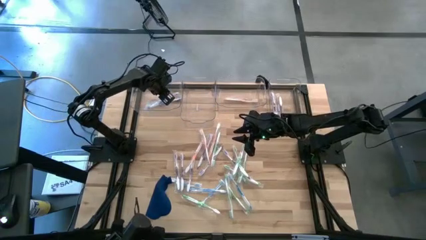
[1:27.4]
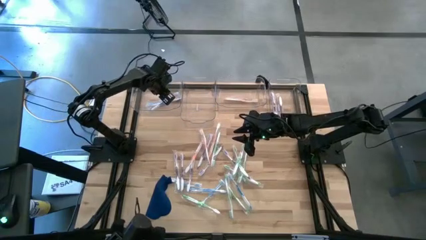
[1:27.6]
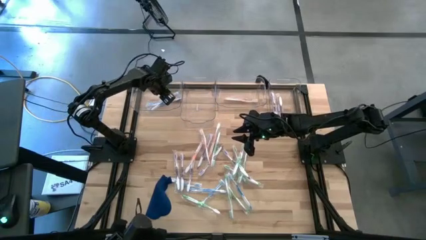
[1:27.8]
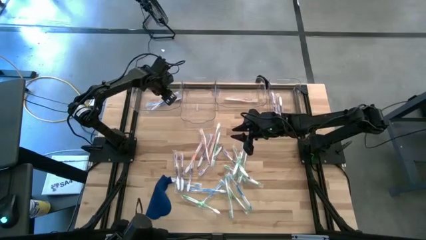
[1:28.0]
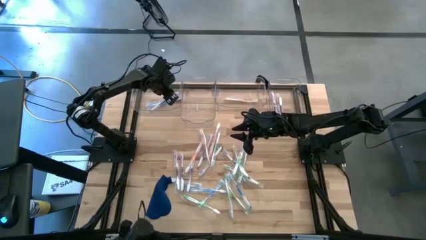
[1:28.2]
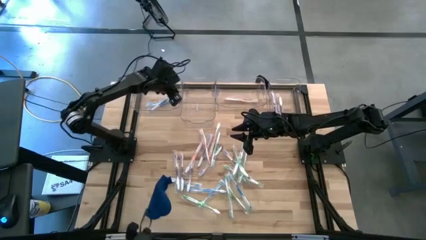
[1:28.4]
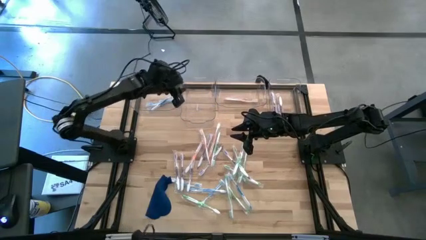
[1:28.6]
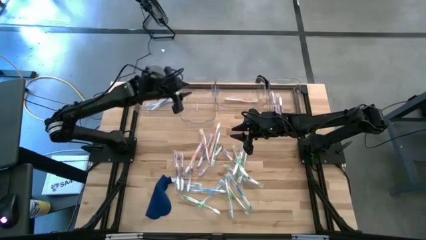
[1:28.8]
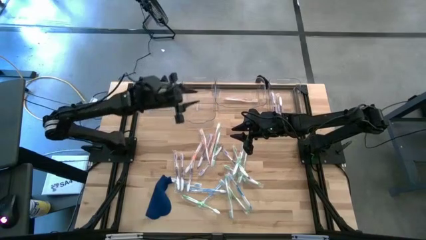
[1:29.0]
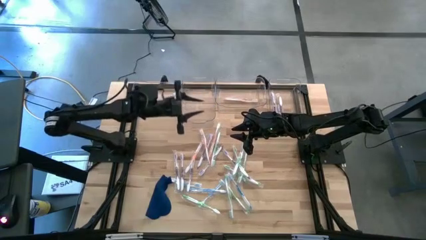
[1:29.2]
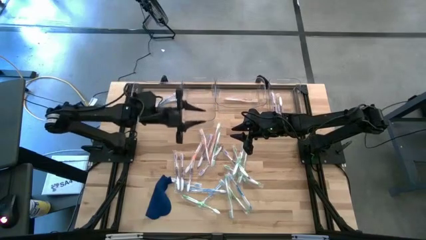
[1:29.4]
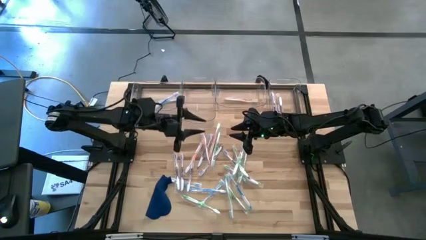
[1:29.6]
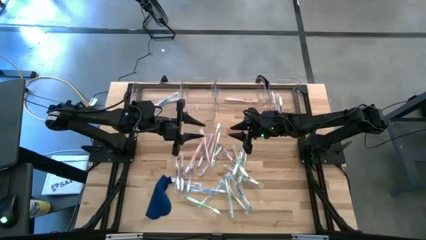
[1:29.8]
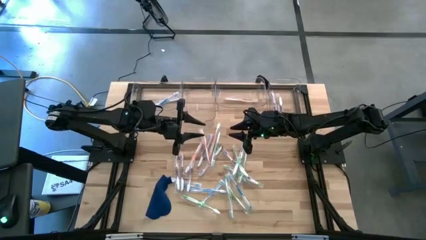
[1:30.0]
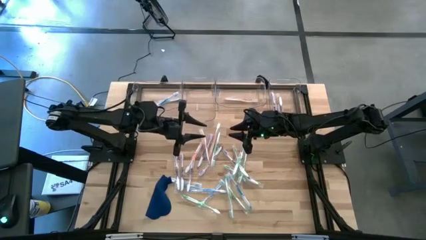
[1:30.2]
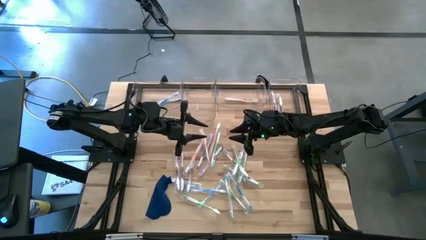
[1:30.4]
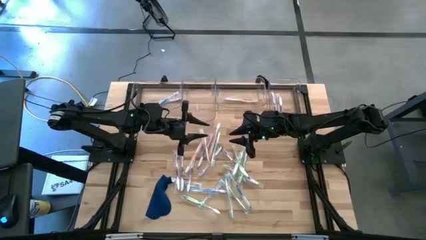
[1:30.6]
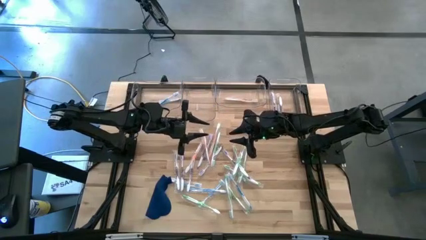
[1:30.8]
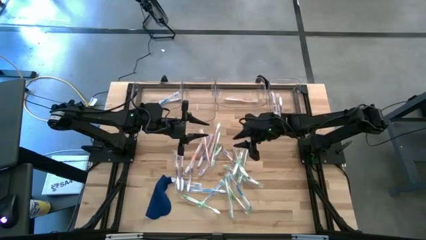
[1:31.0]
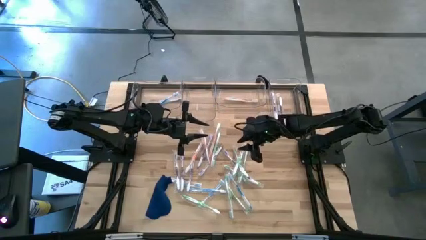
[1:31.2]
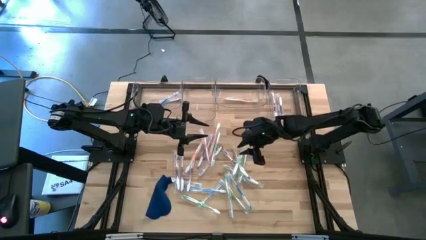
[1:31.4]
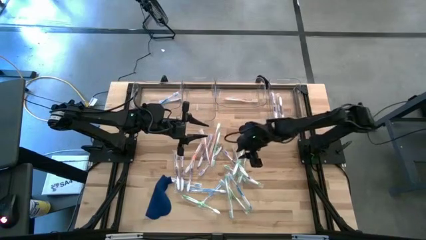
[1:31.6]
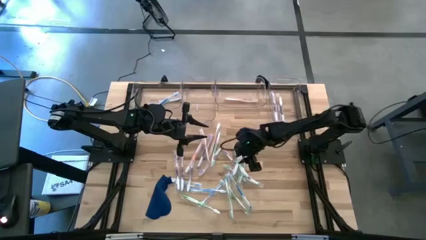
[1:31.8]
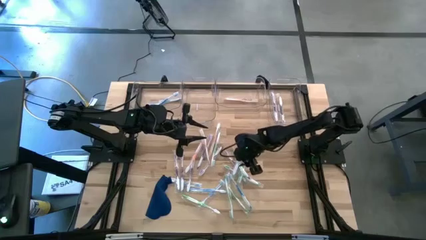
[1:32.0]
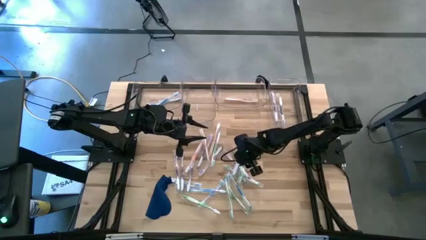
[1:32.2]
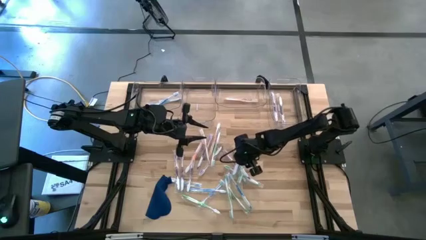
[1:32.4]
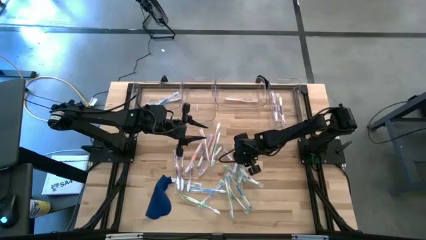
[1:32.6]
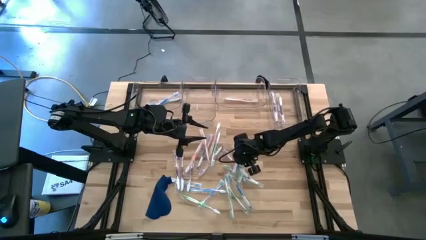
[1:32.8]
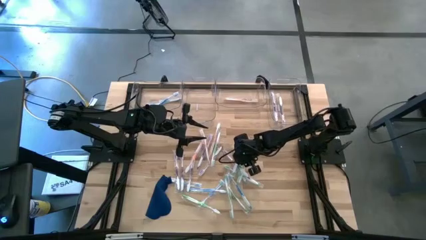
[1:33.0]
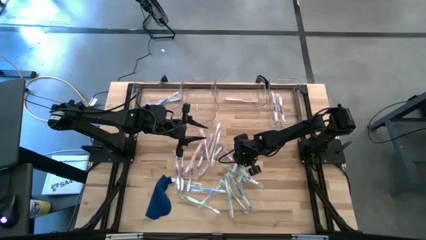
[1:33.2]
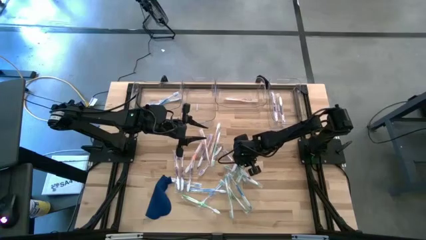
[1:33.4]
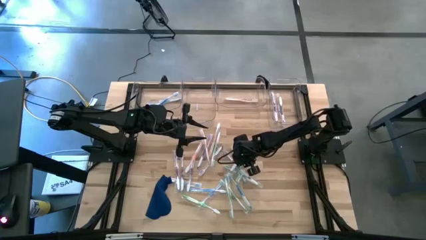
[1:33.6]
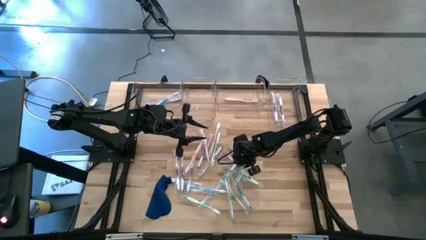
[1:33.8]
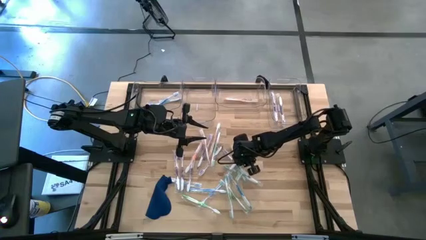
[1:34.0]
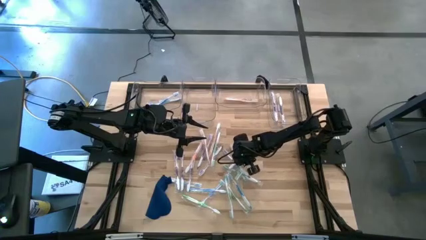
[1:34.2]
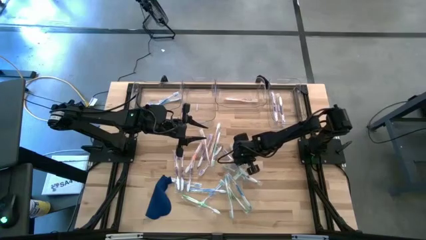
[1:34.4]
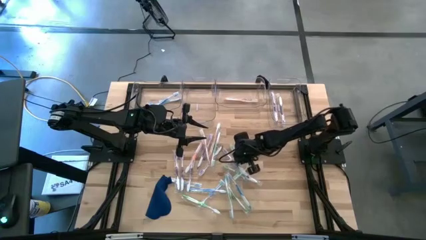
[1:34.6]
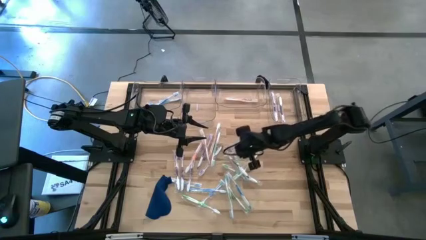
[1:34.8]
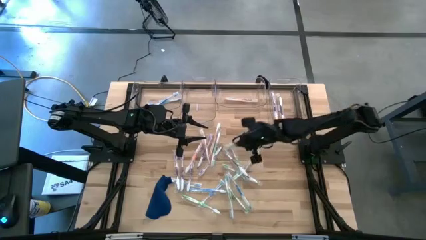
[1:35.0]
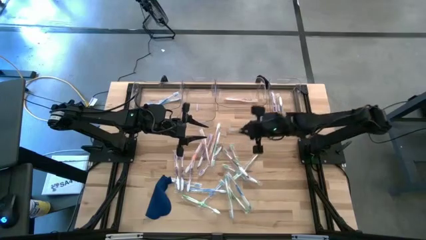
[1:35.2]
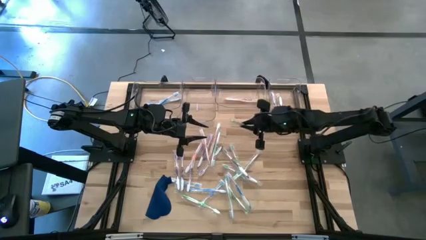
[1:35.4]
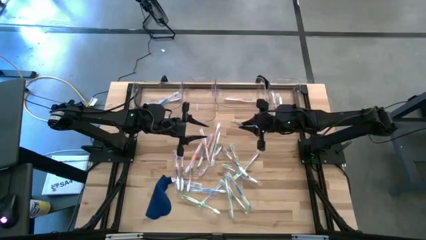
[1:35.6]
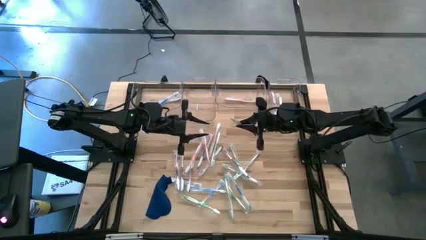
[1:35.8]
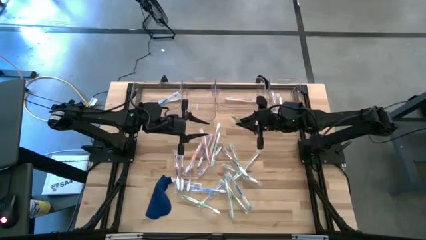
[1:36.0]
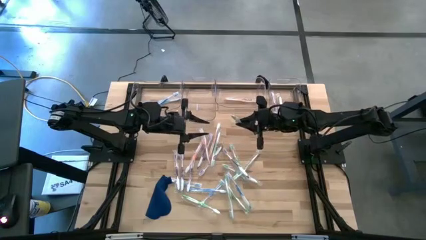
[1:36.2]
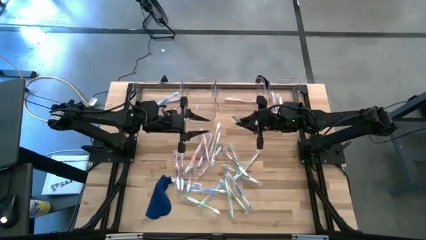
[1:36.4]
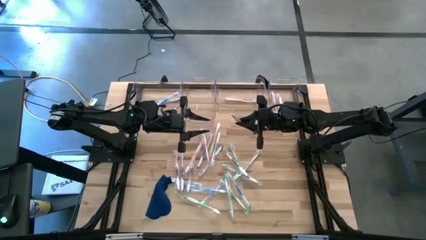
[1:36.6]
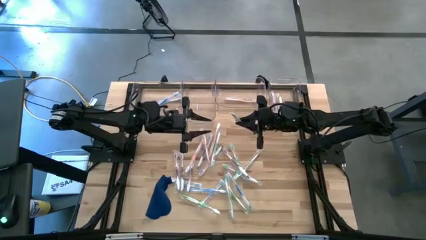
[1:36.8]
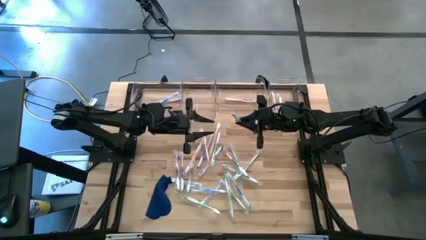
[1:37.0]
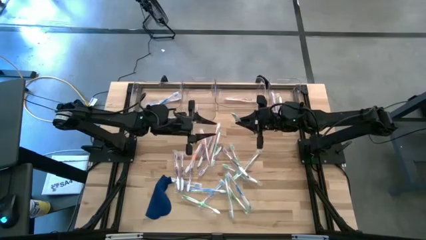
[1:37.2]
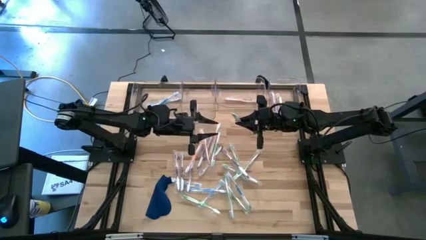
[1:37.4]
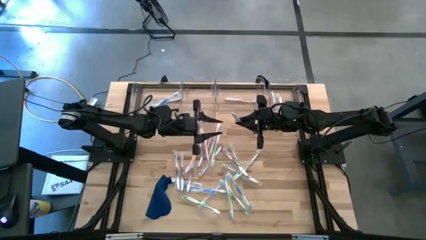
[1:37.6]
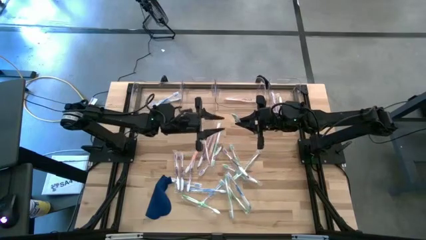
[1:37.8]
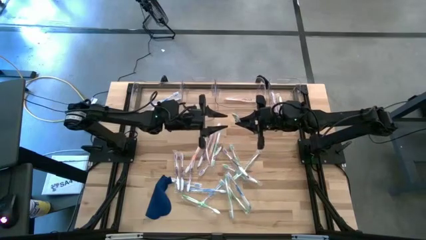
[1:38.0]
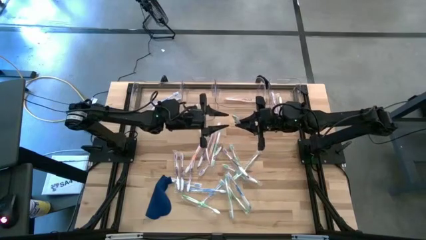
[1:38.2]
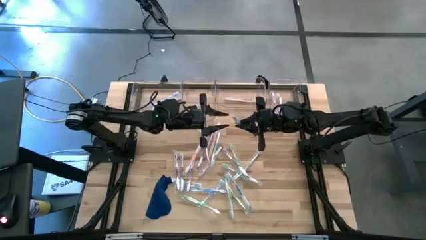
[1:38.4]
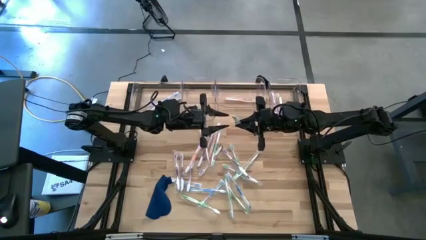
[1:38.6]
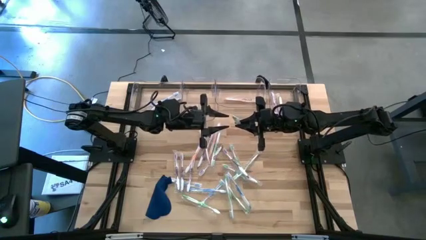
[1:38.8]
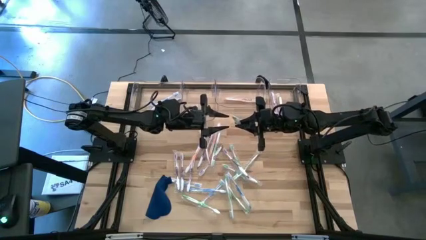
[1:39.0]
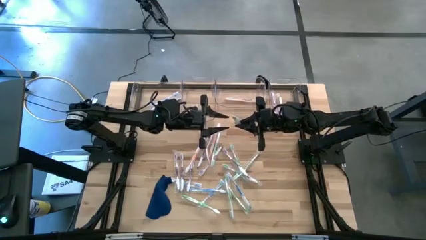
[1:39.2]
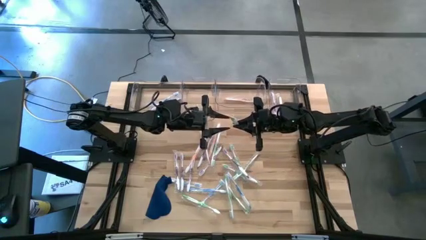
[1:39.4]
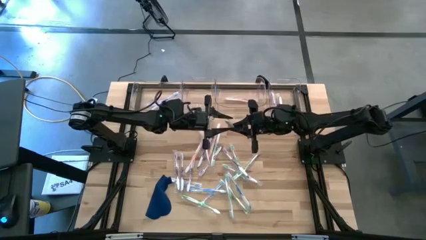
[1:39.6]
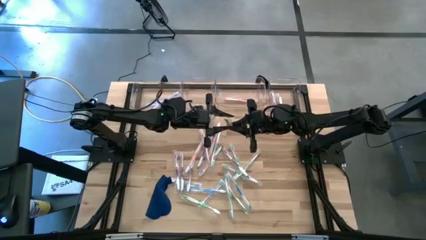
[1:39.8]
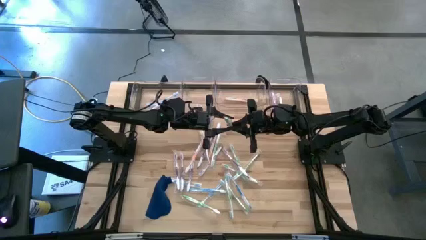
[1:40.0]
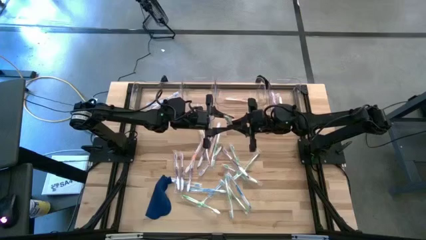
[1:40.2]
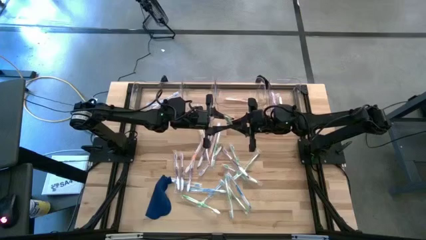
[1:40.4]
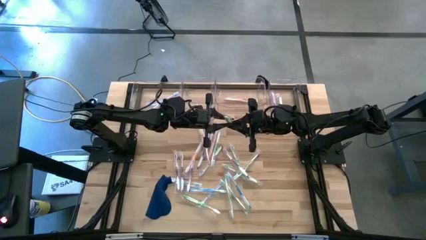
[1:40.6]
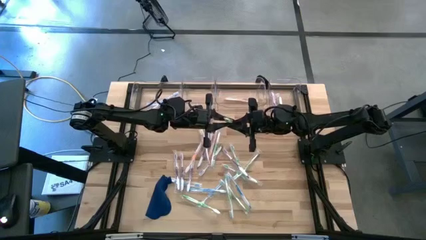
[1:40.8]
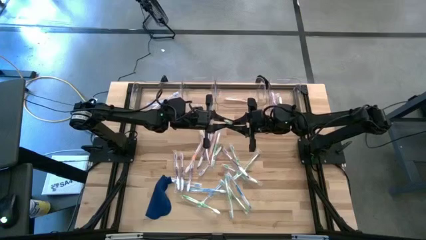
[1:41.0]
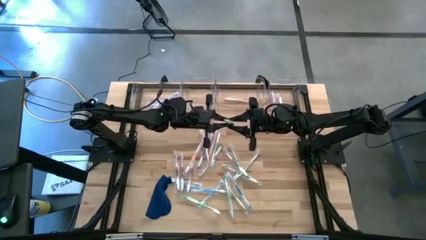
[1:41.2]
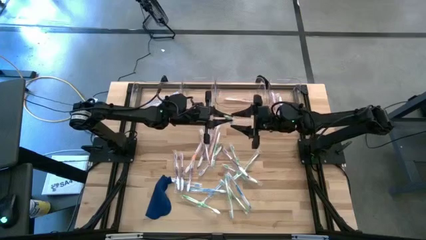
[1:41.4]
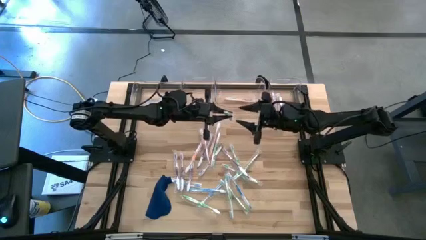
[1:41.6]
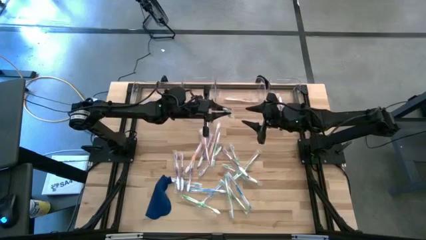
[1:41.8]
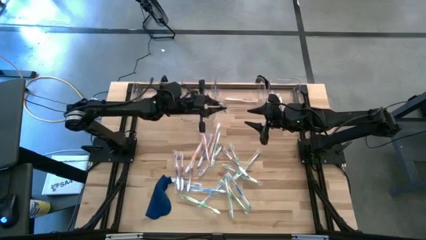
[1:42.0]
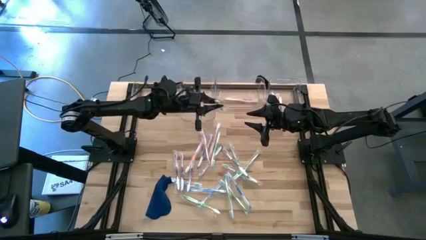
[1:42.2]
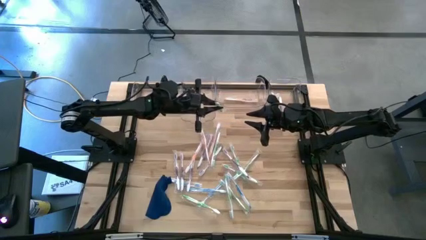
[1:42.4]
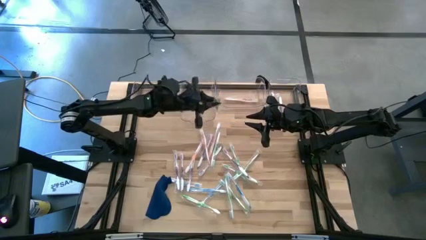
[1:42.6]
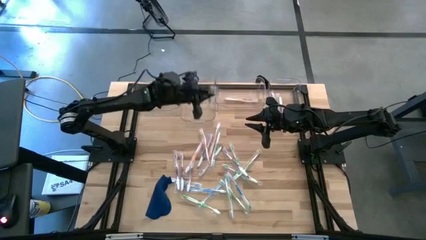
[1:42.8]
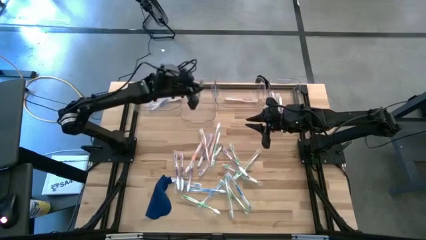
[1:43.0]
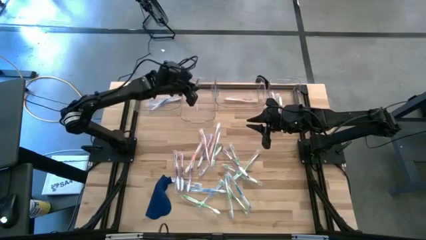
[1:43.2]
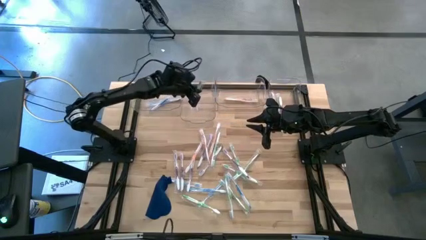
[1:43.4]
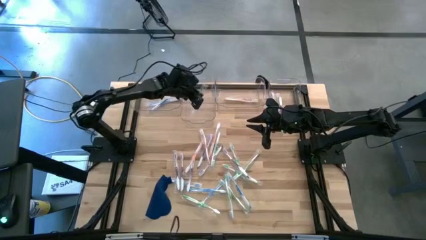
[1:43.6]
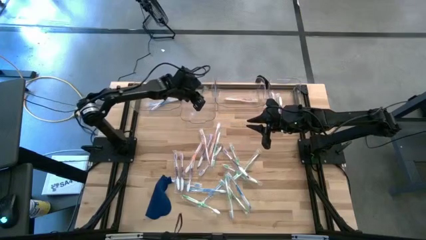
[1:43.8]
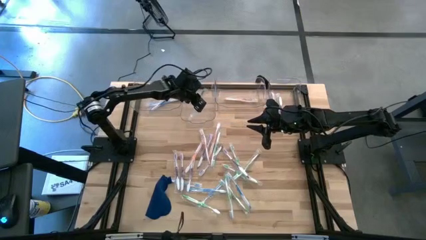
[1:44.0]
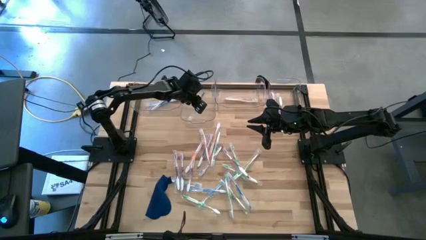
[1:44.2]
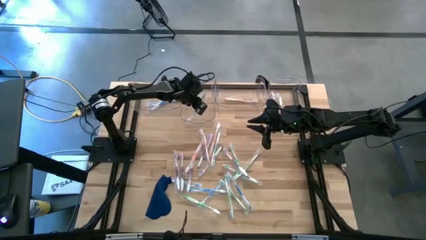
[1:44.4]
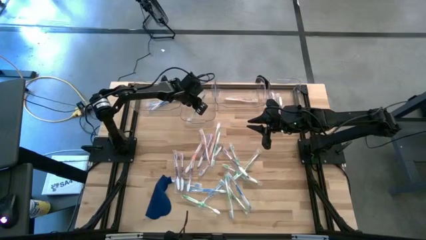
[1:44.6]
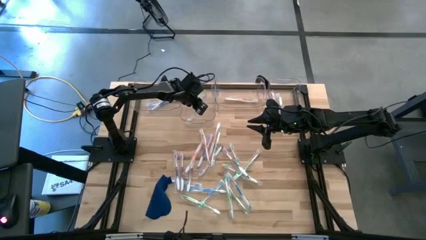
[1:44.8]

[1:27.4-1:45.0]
Task: Pick & Place Toothbrushes
Put the green toothbrush into the middle left transparent bin
